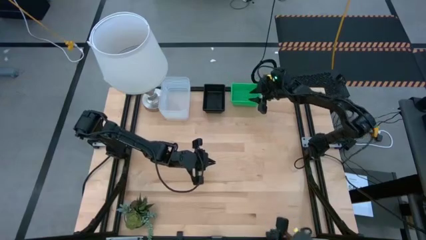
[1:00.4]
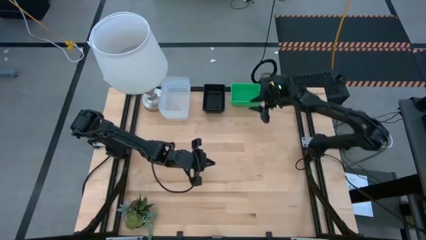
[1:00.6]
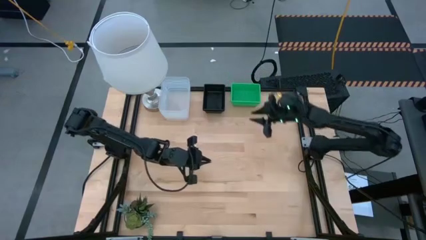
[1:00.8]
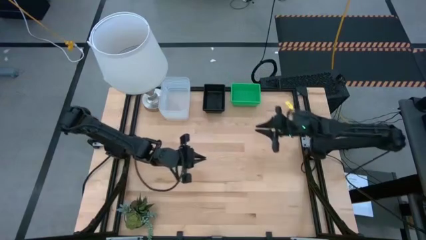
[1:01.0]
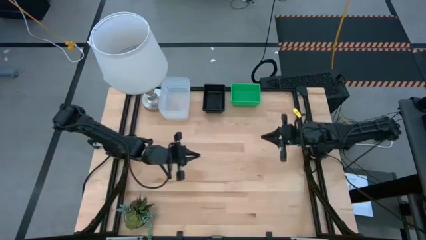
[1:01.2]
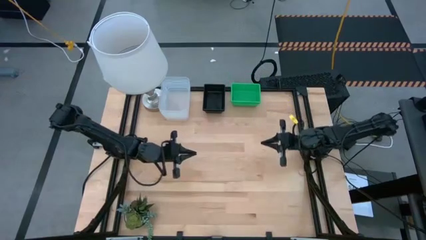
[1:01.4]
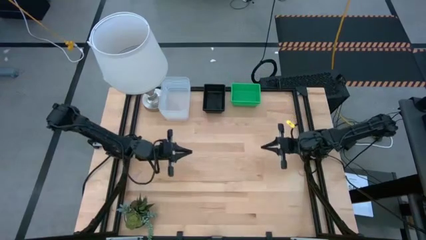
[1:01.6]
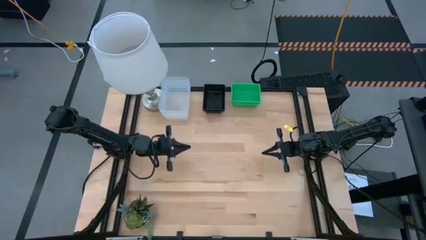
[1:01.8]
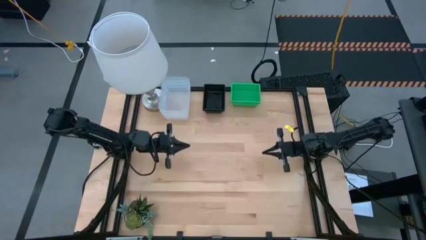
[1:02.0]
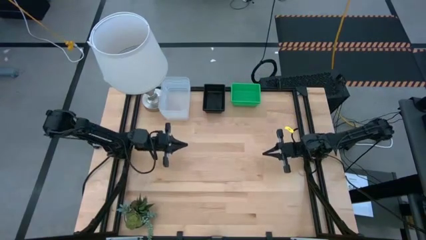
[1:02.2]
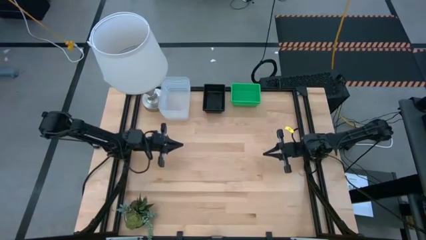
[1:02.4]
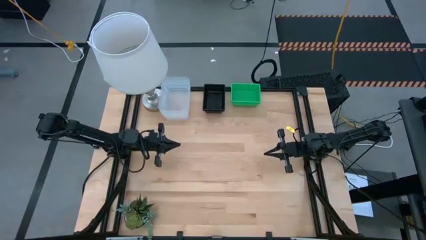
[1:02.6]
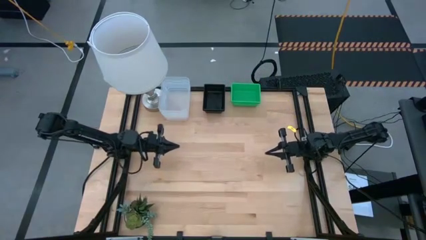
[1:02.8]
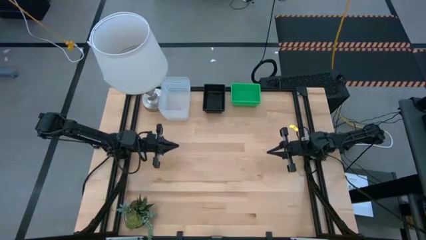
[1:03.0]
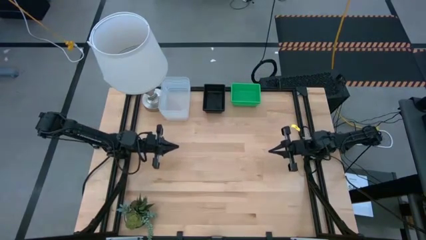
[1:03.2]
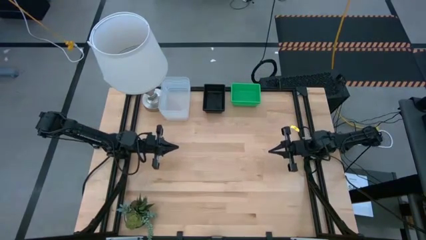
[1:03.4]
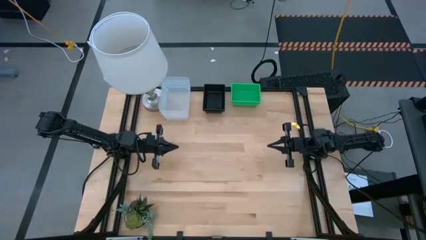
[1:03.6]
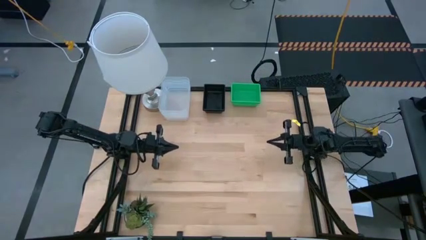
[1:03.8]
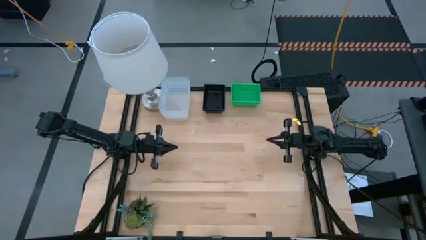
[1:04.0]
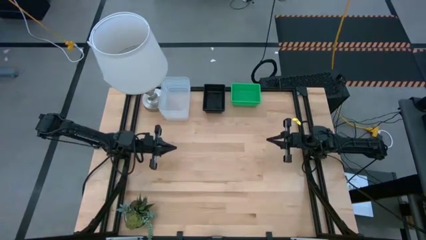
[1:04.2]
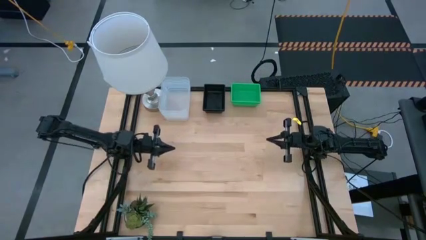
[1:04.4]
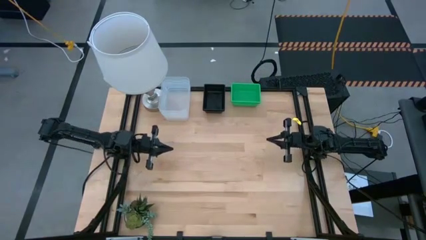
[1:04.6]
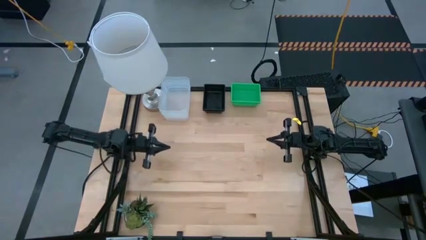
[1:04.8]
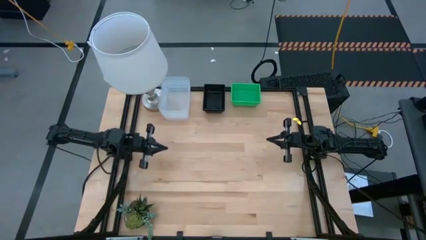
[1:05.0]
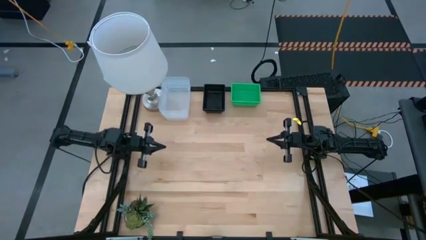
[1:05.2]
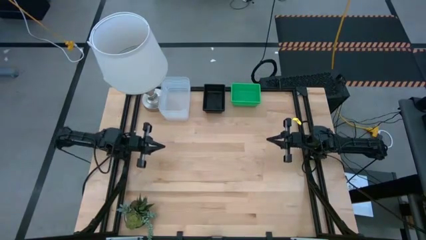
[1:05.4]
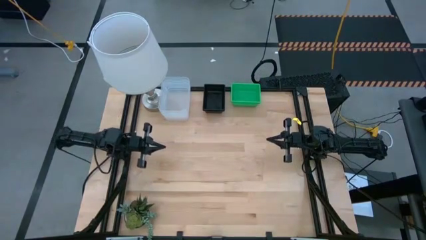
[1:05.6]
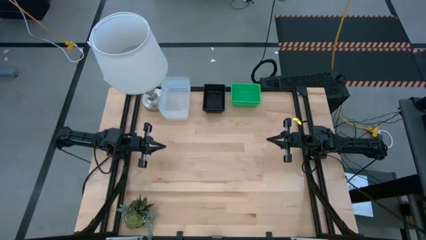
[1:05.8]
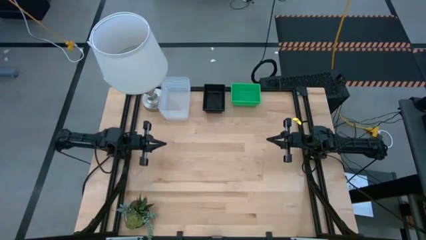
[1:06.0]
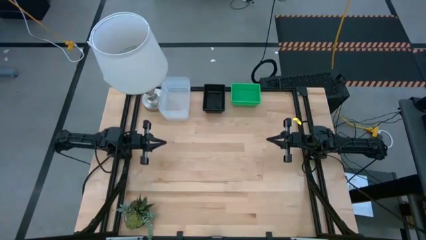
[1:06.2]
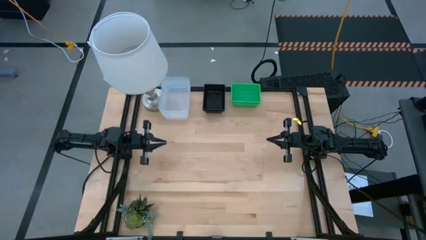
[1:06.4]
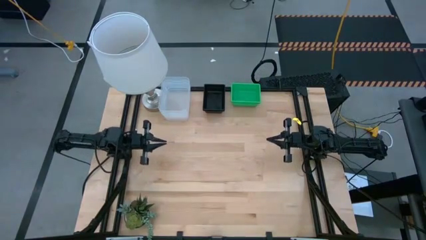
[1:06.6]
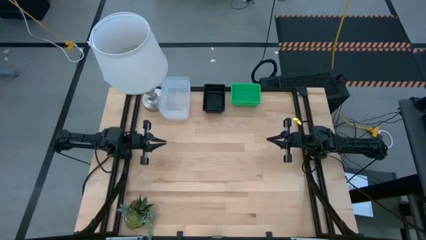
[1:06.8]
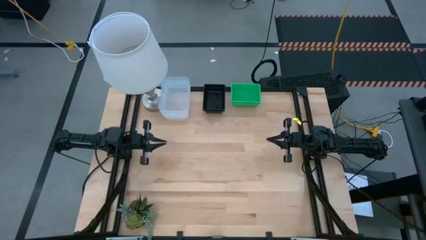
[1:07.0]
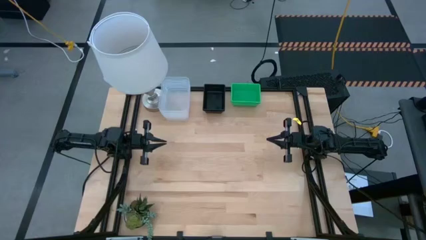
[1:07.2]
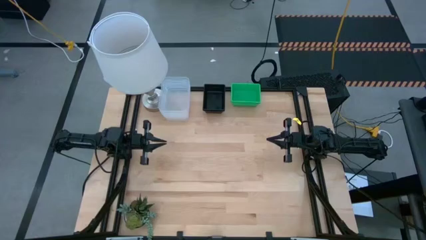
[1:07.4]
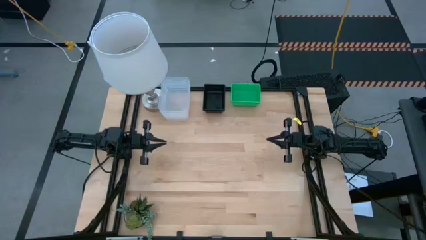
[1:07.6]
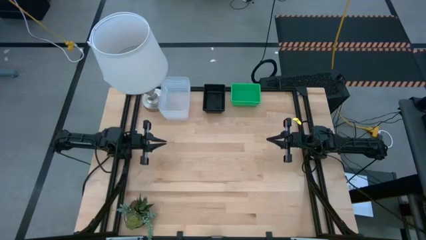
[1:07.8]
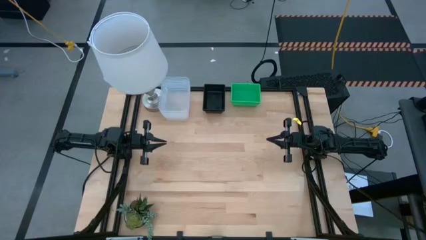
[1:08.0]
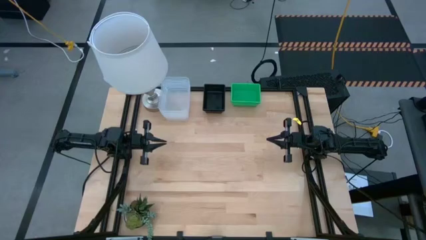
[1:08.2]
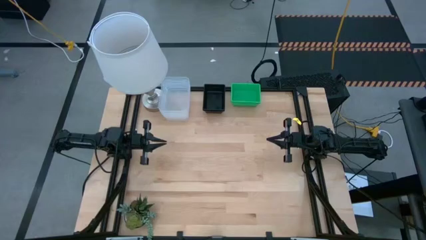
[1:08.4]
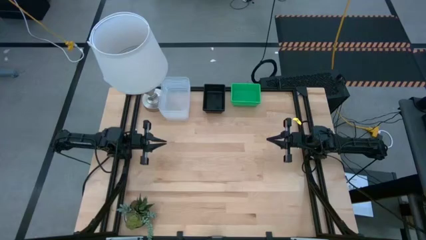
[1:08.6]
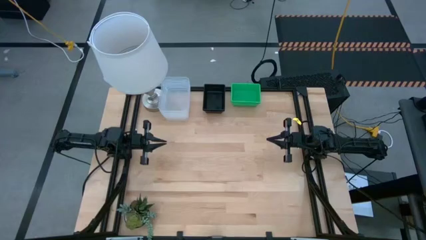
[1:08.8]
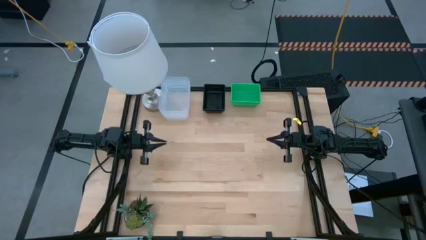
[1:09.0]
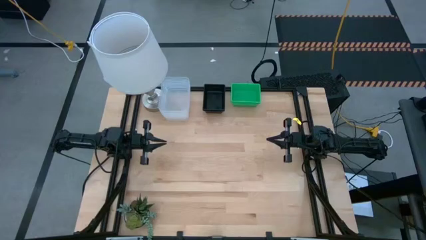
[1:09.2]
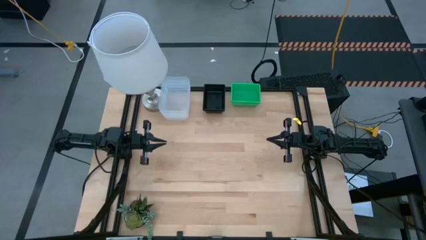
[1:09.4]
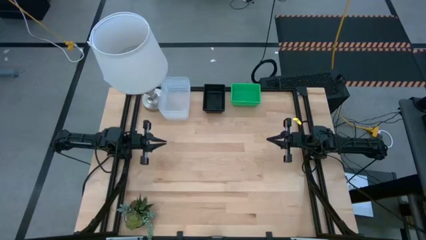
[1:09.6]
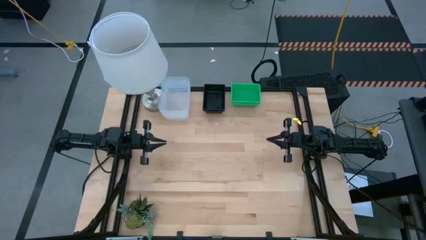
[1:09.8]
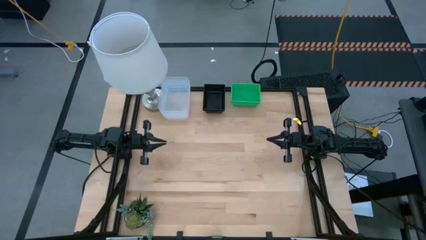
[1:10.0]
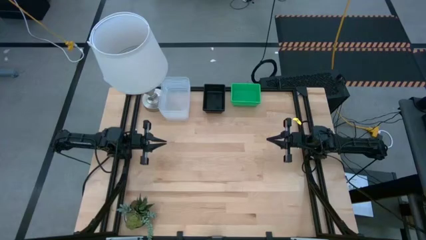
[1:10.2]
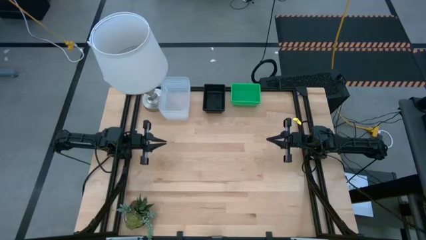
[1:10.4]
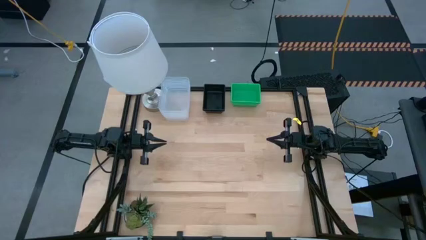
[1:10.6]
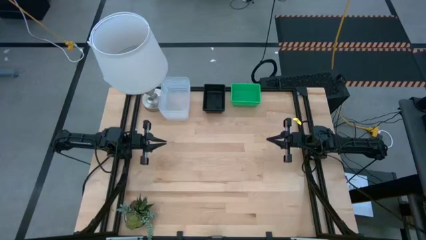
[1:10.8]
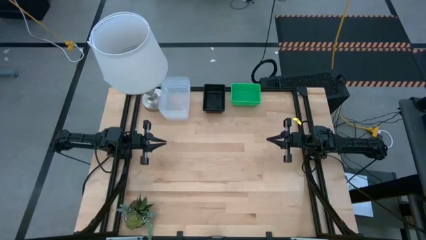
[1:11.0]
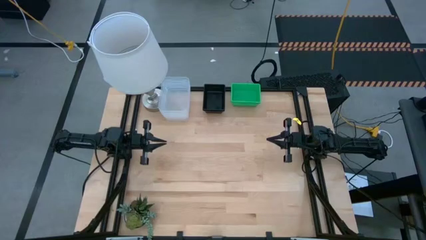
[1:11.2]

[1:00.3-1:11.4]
Return to Home Position
